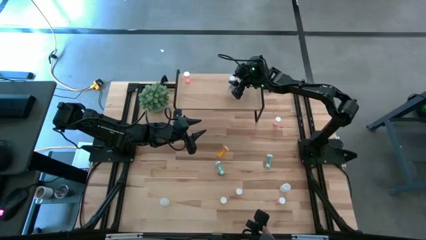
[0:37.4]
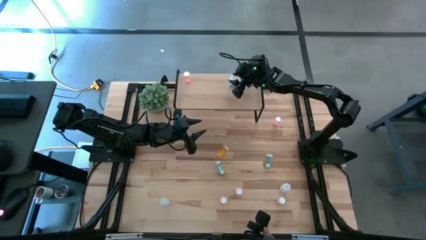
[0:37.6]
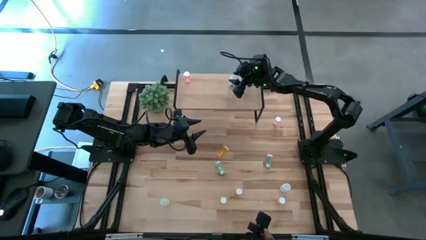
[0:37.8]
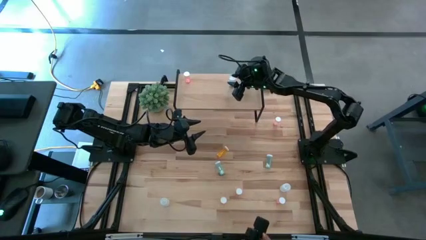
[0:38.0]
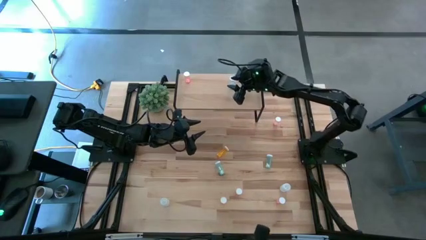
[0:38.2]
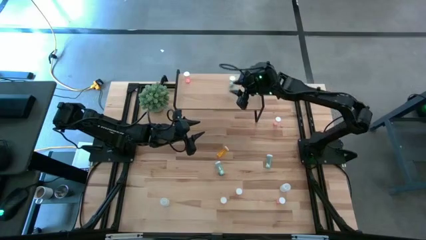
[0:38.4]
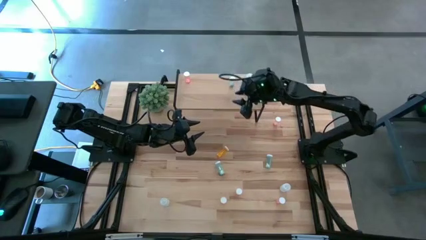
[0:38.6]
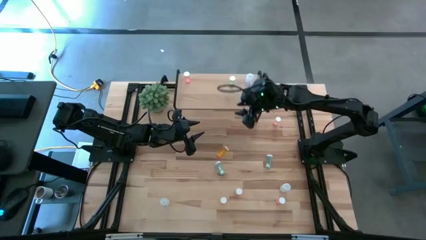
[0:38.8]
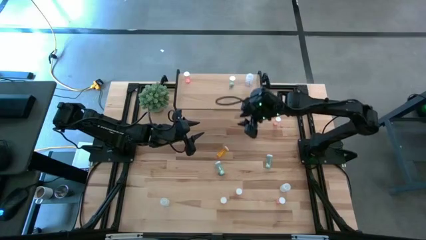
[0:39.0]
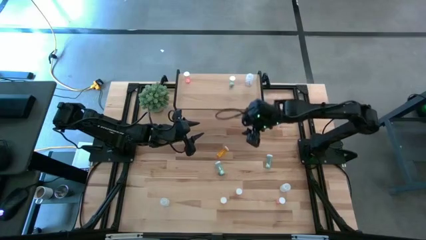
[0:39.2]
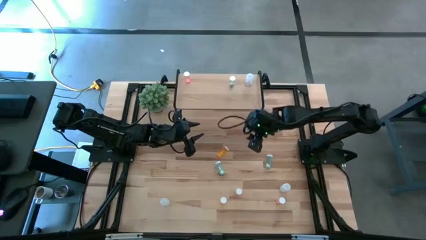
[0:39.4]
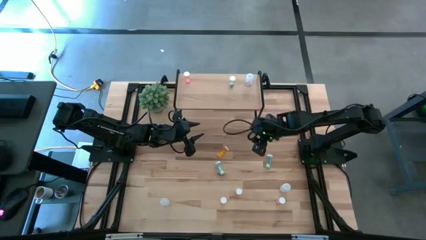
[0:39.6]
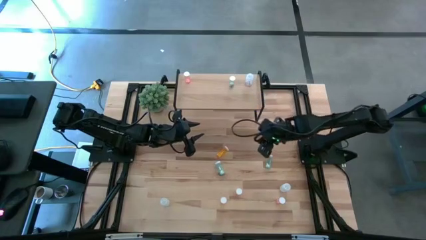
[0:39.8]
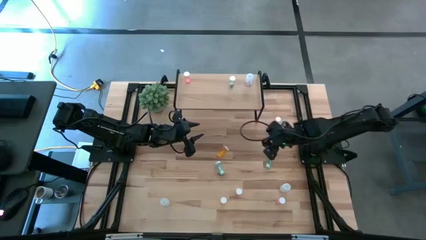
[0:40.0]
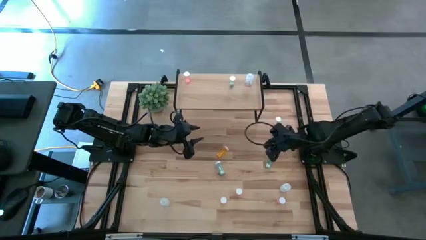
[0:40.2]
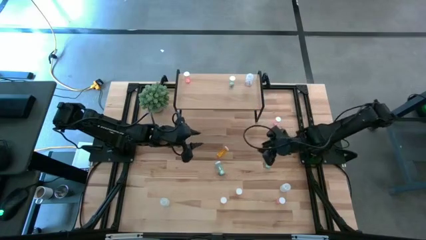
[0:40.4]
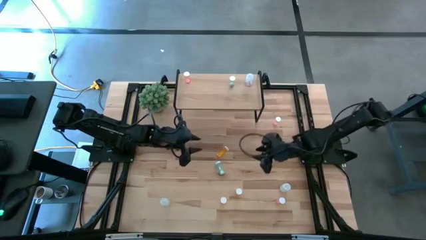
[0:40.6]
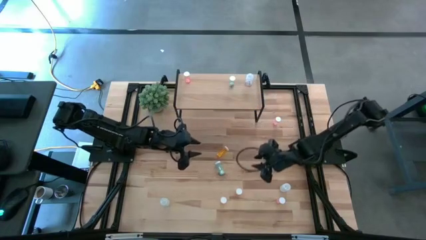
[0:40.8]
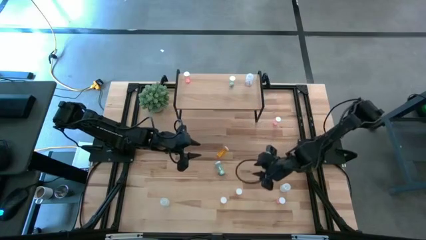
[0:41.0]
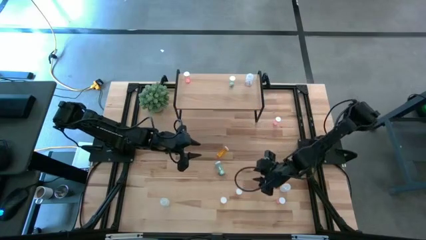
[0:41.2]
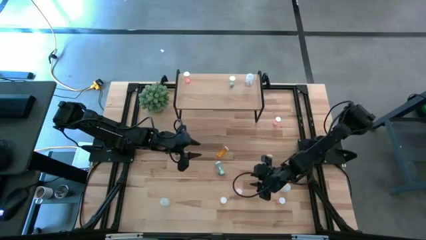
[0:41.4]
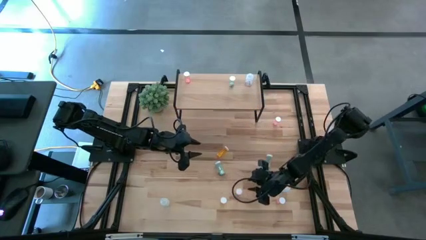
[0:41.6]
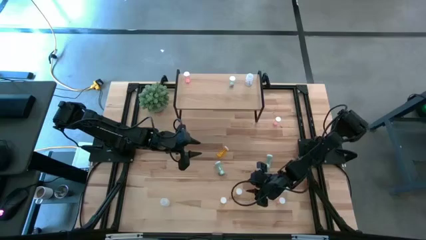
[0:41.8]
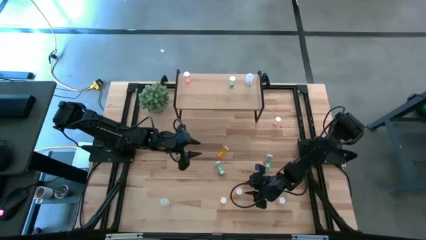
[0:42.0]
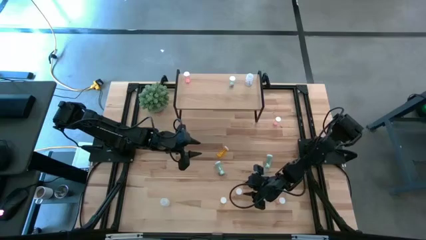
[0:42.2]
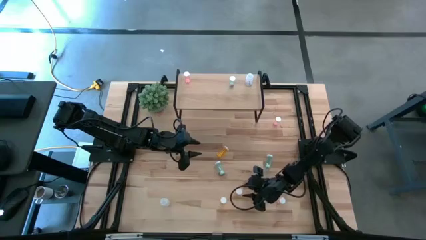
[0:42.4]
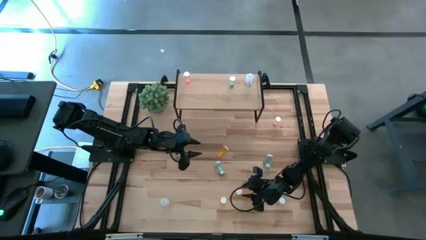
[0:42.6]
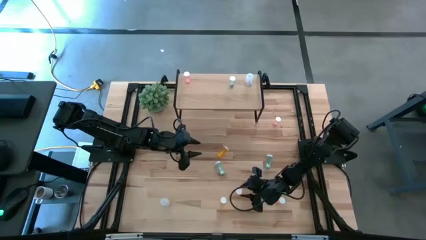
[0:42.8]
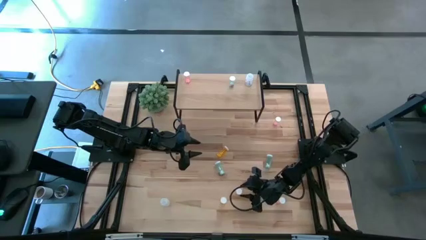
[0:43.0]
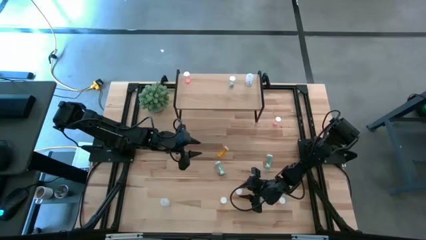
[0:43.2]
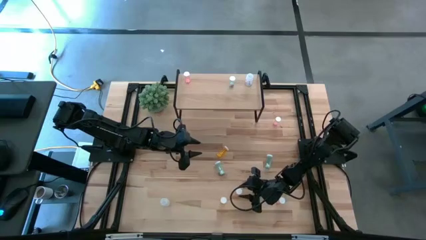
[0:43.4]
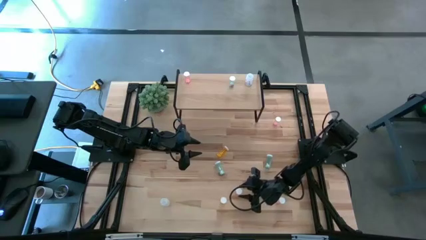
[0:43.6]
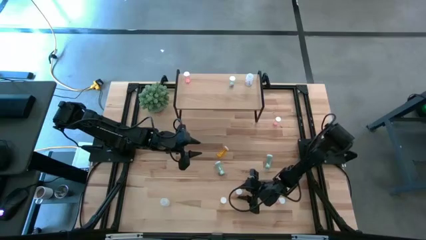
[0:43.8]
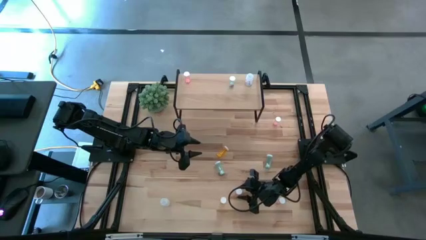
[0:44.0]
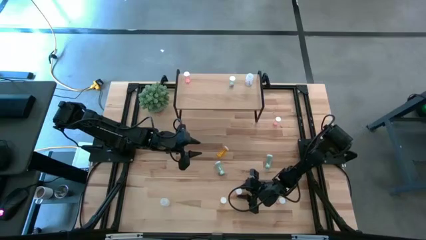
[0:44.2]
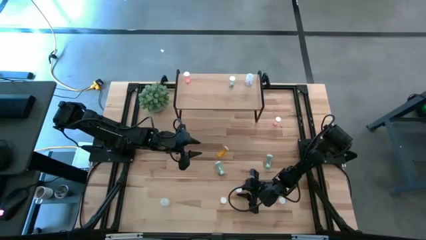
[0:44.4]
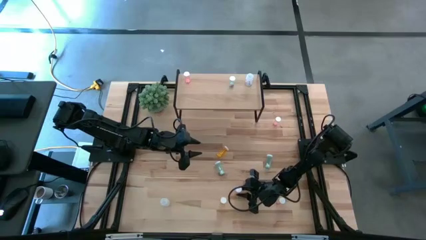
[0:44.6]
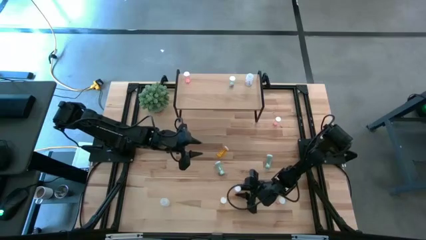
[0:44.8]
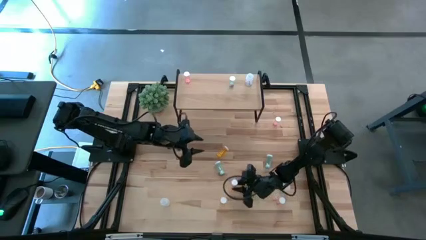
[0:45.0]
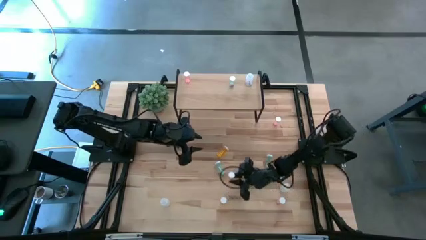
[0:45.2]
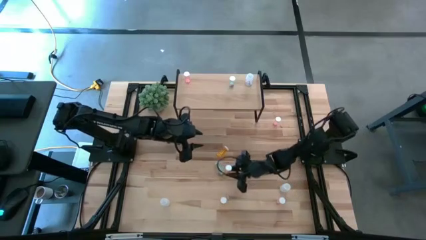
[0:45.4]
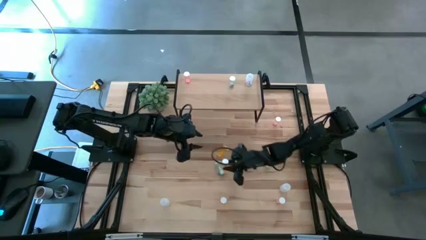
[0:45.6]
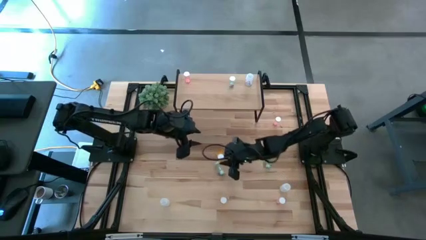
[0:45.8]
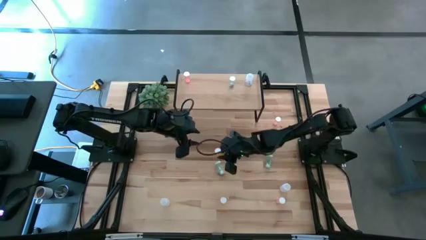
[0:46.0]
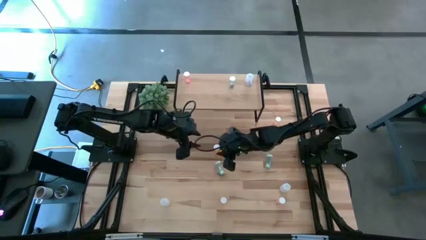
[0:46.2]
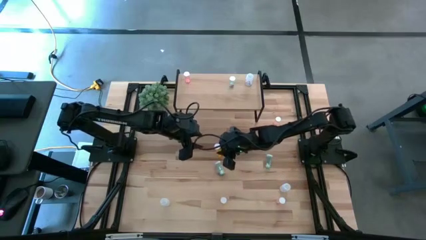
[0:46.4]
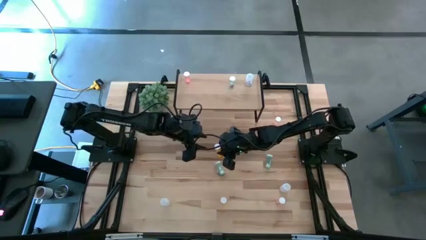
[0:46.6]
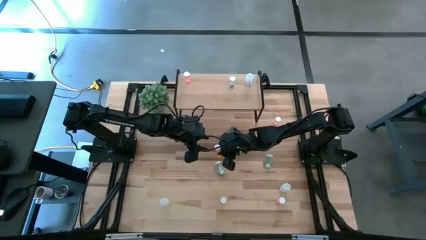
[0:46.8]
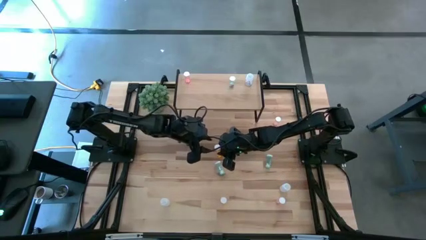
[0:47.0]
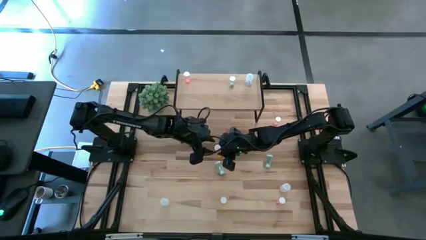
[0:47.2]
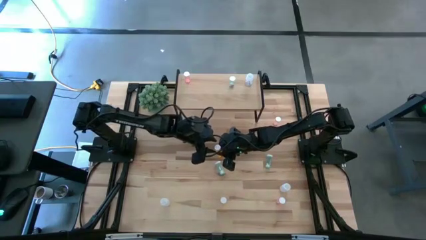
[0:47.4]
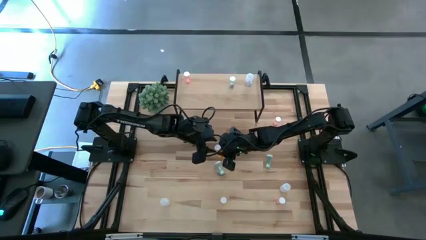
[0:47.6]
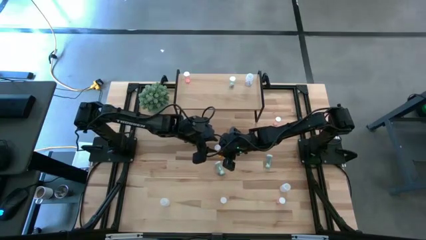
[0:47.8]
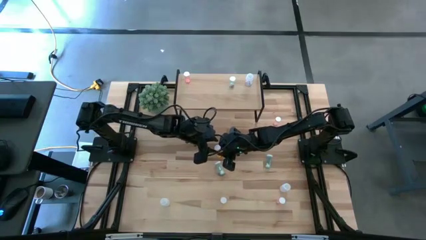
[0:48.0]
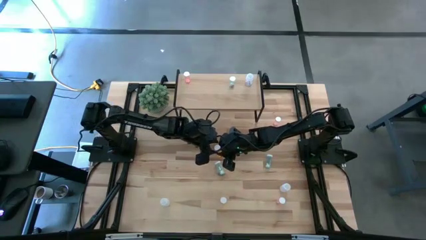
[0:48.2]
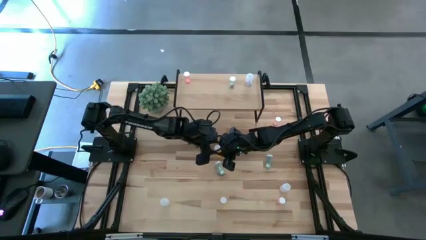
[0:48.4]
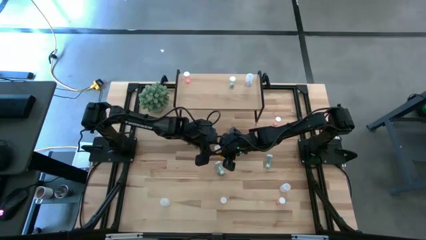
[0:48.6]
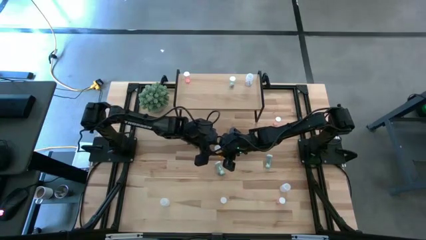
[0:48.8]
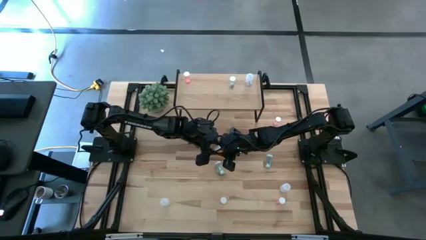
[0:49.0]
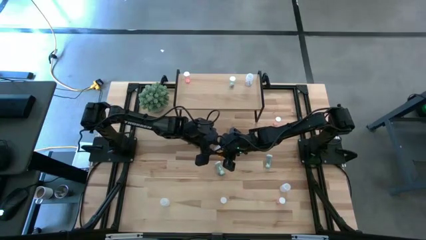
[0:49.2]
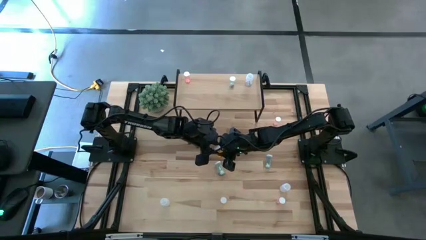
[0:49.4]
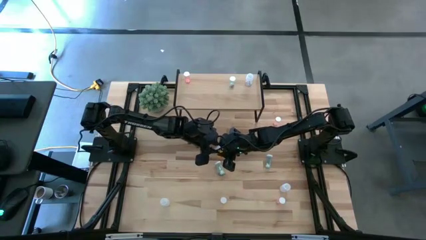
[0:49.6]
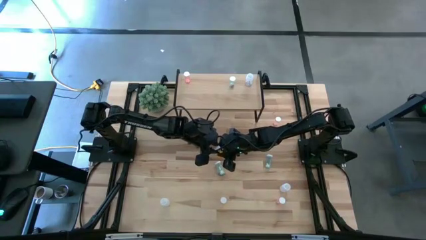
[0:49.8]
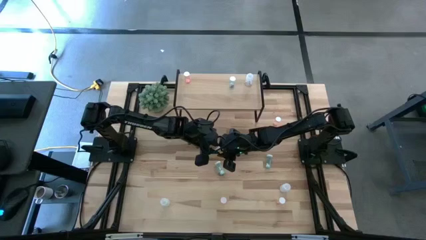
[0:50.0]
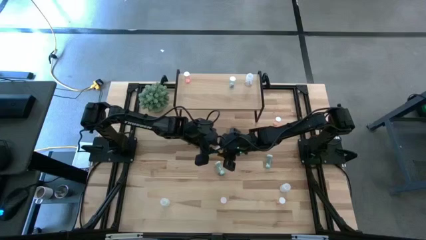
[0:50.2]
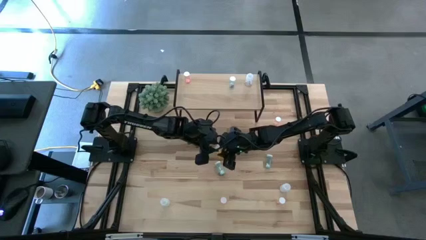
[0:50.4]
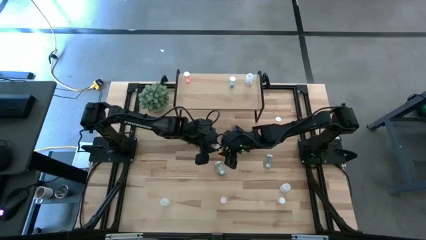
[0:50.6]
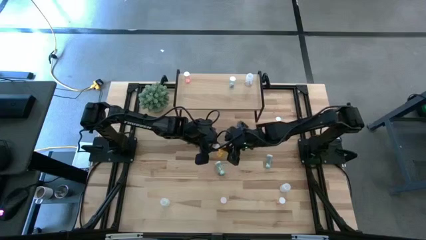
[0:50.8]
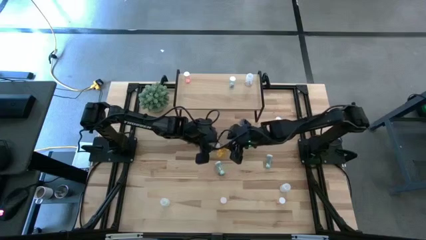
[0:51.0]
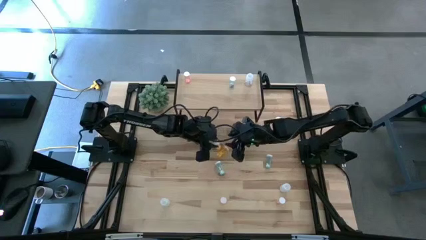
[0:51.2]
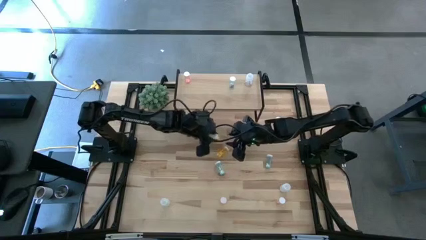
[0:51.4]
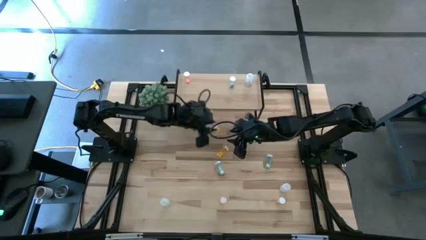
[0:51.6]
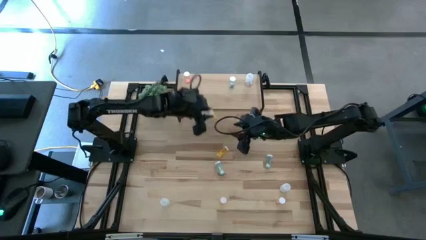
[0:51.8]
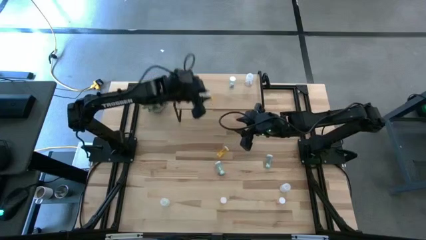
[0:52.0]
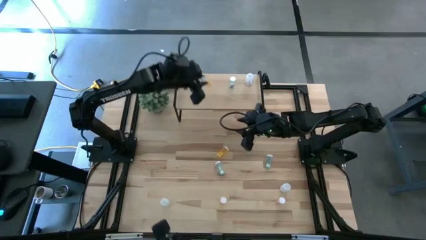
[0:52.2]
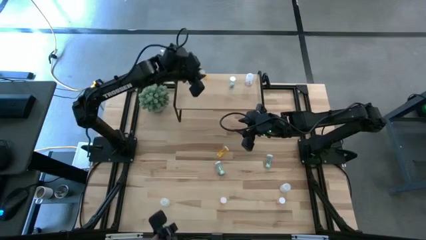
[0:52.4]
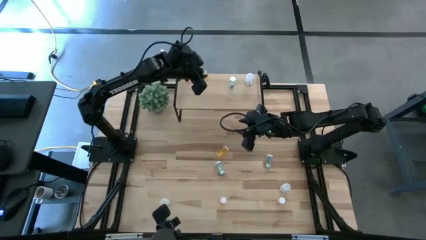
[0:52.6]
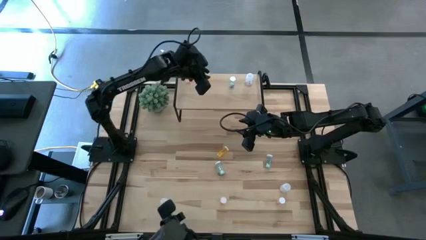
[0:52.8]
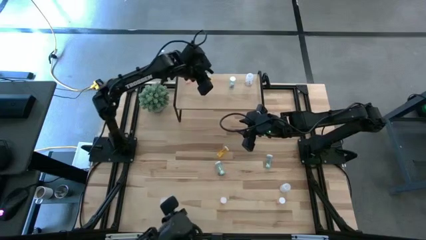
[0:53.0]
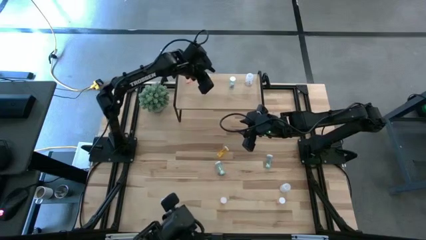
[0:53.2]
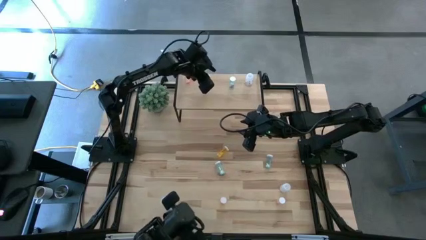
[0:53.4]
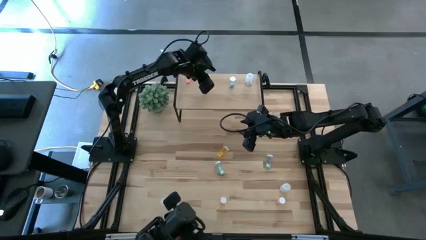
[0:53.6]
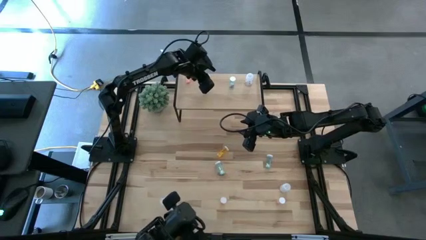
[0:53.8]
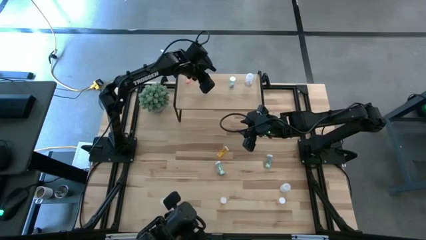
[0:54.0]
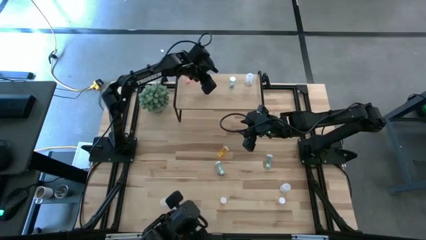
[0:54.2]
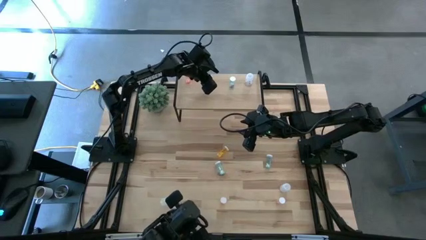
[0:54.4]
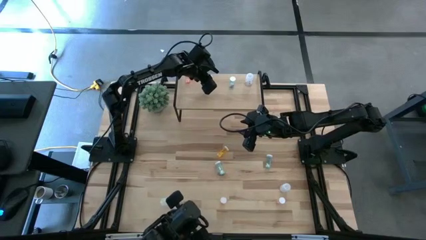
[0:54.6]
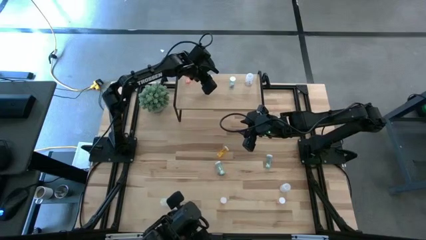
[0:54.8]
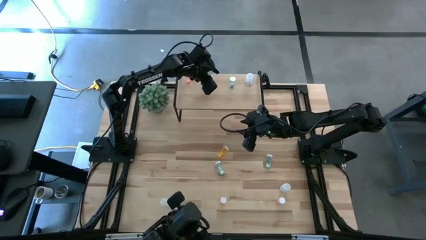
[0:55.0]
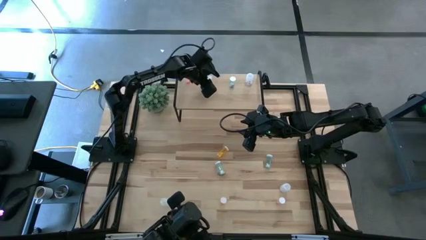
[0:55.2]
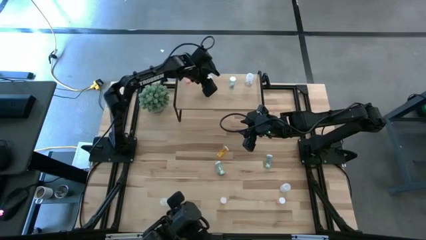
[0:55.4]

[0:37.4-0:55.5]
Task: Pick and place medicine bottles onto shelf by color
Put the bottom right orange pill bottle on the shelf
